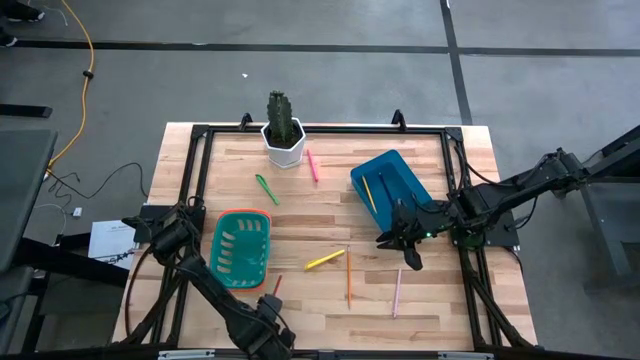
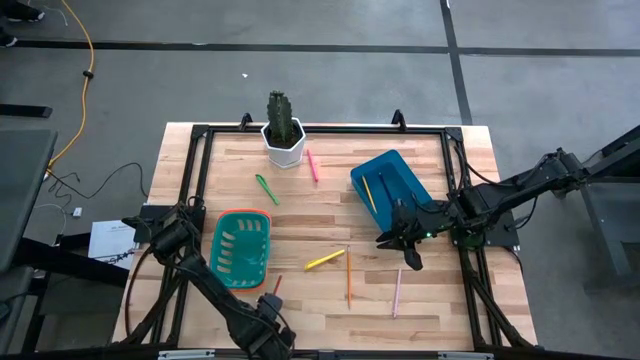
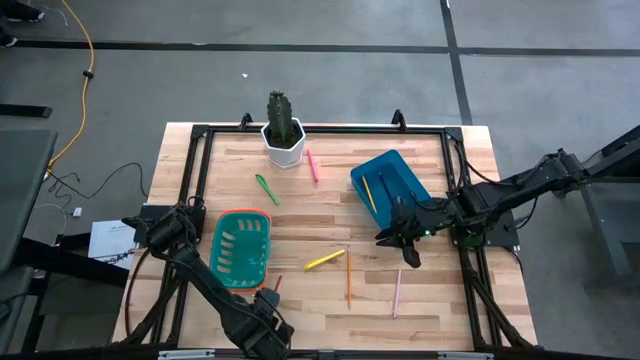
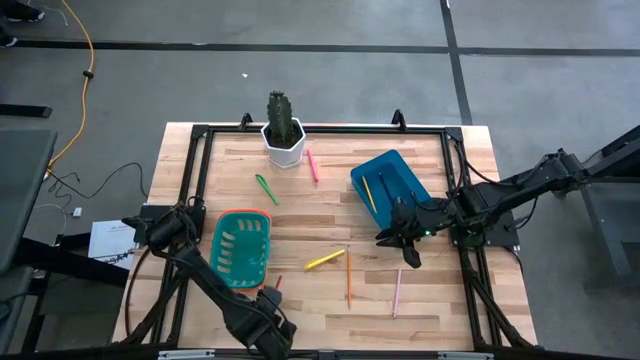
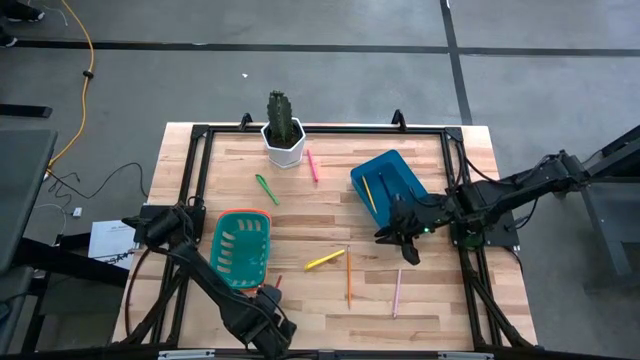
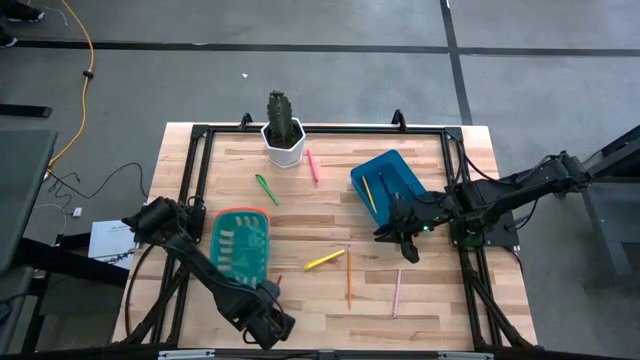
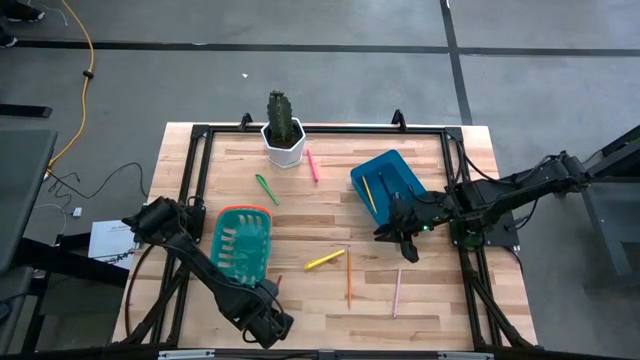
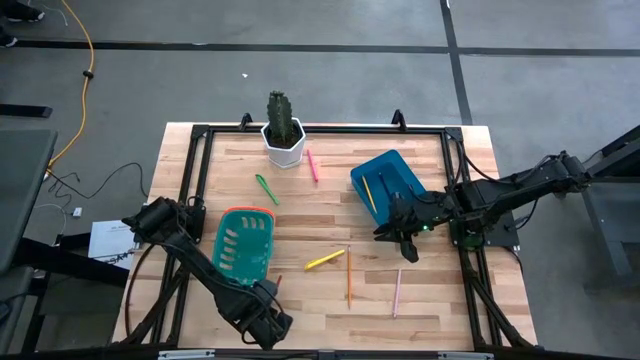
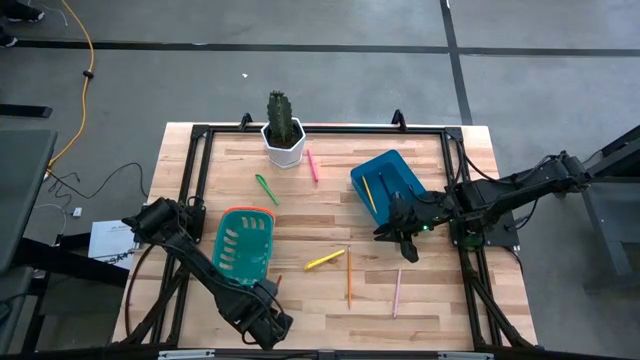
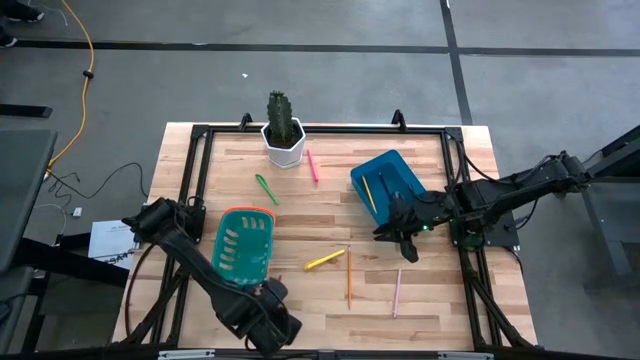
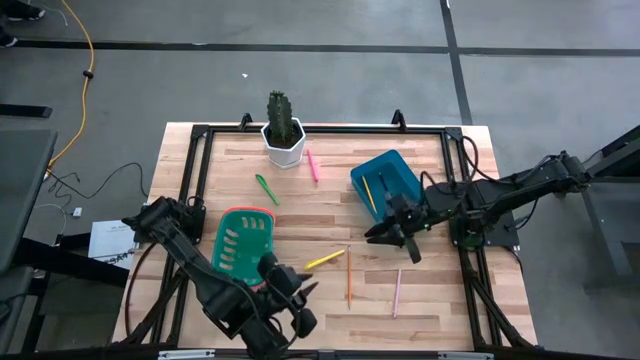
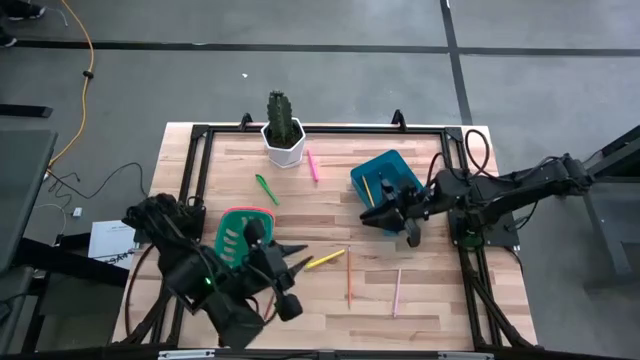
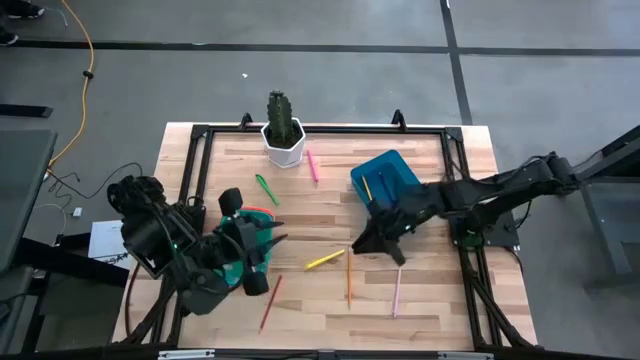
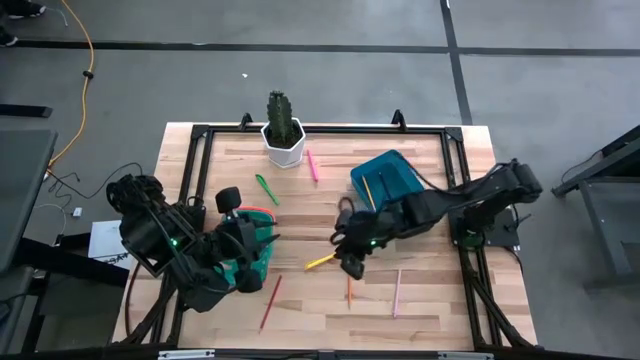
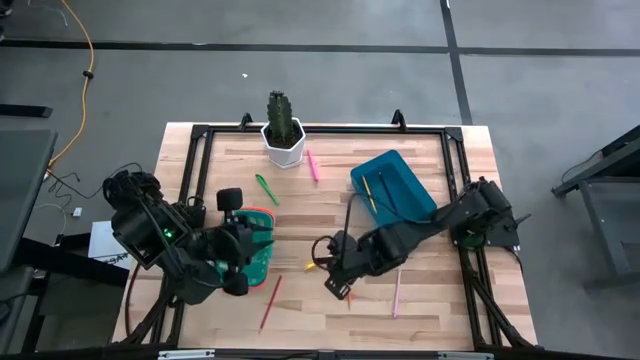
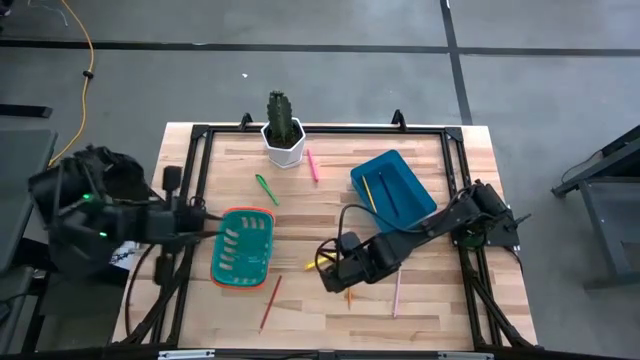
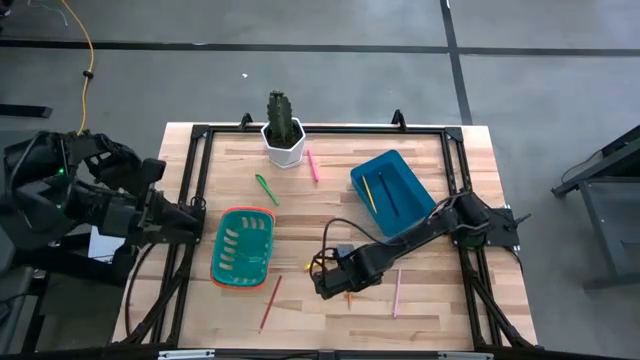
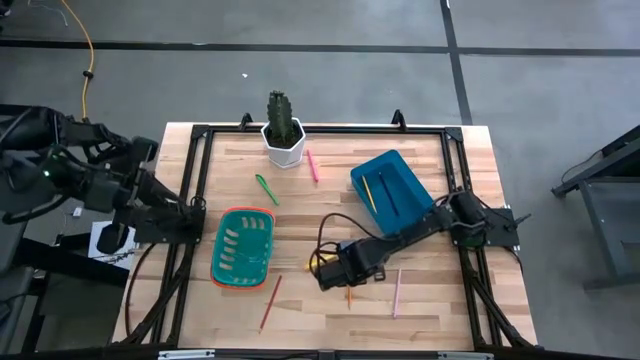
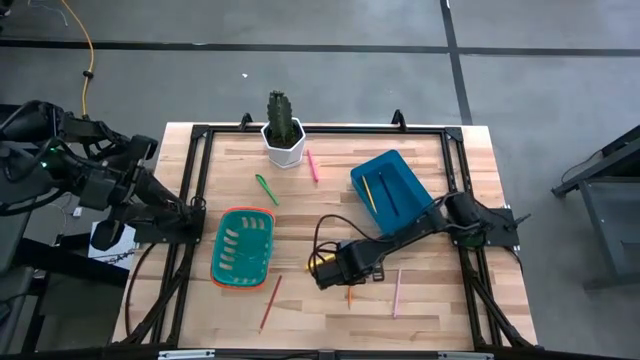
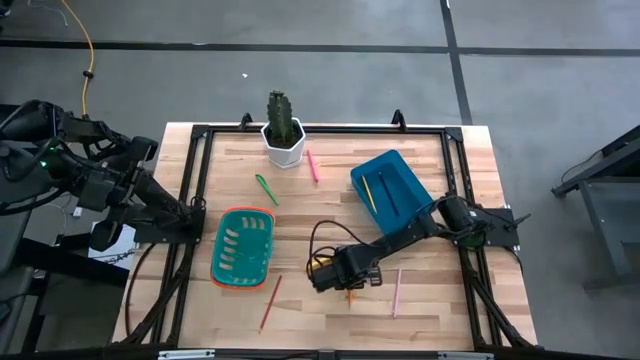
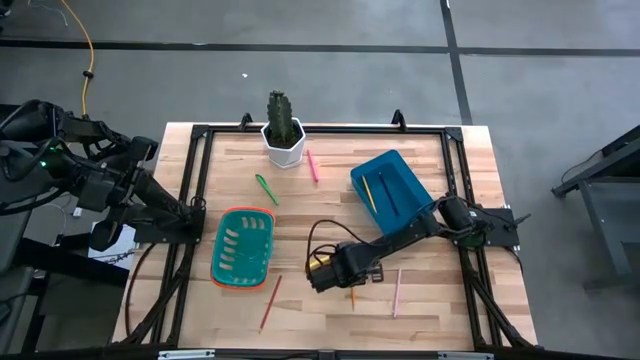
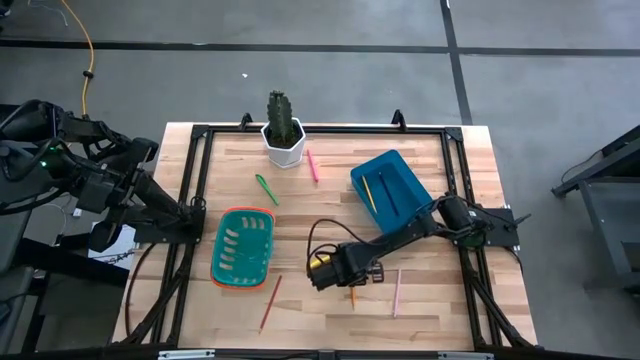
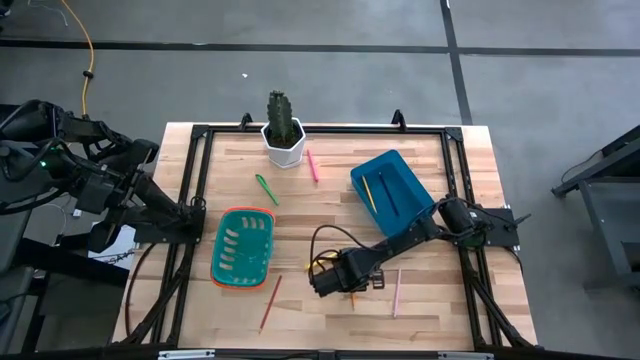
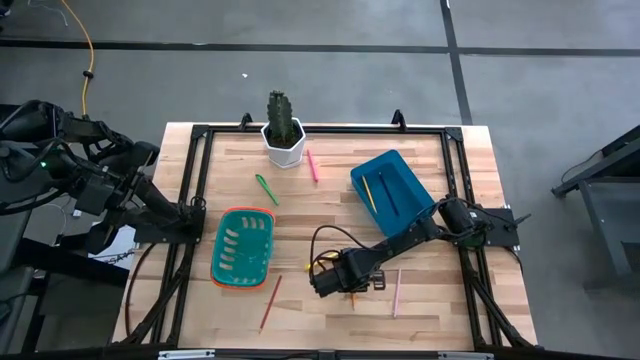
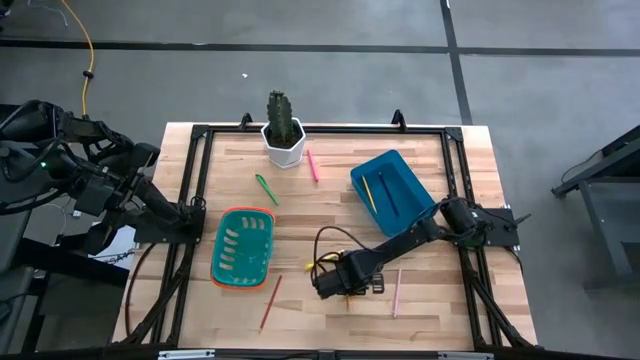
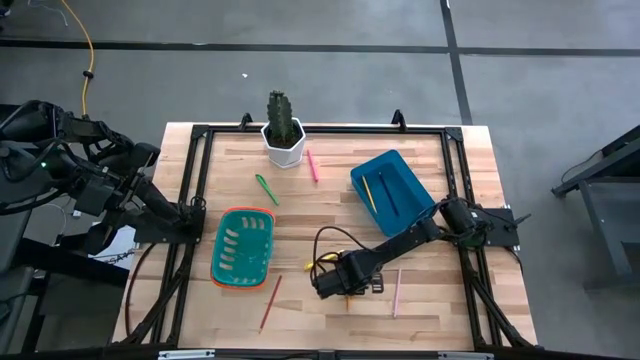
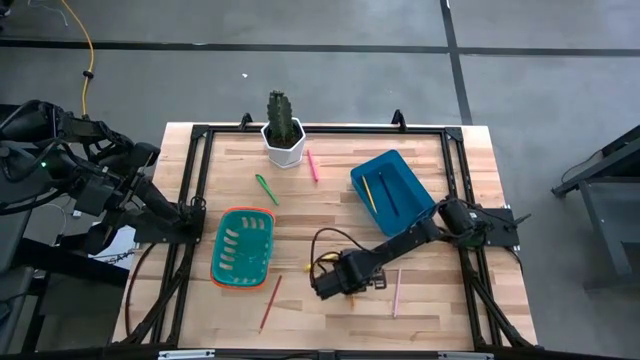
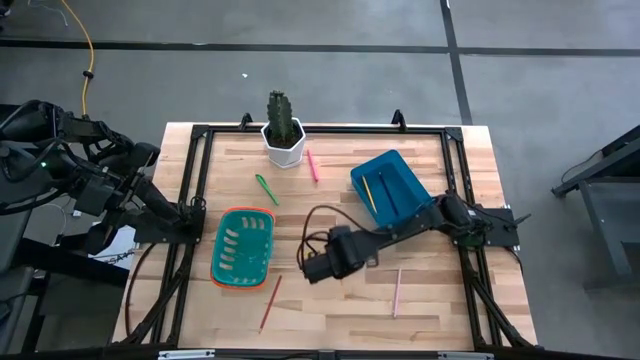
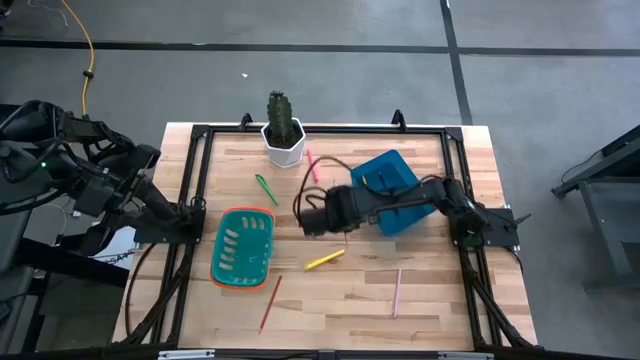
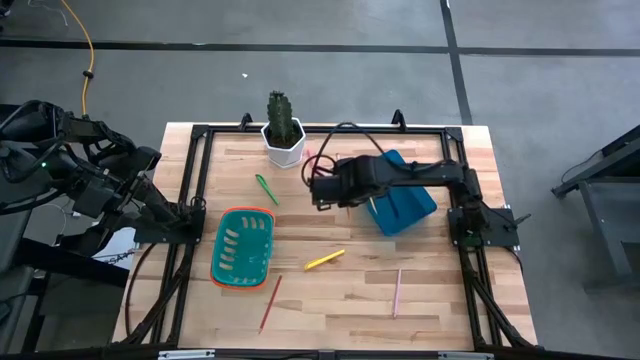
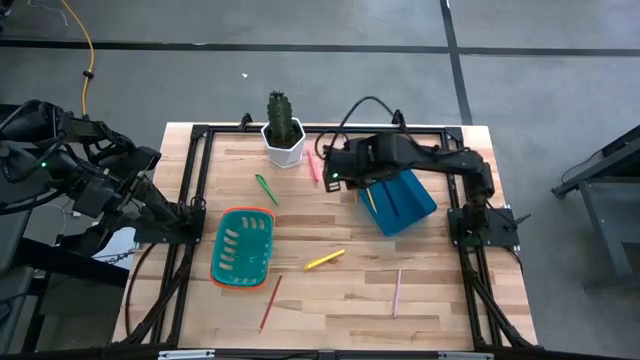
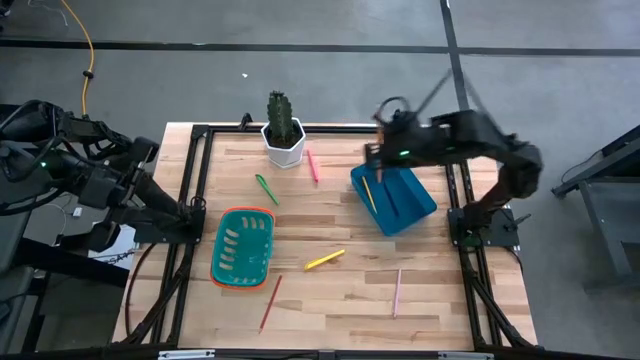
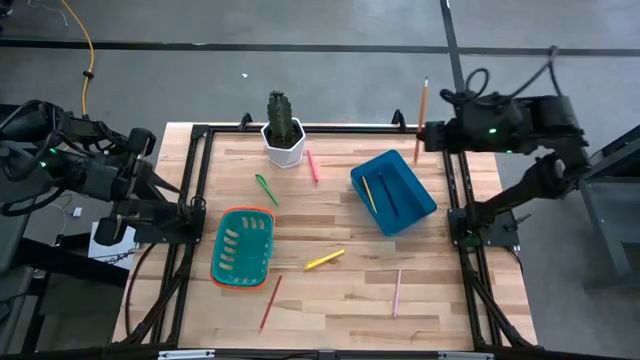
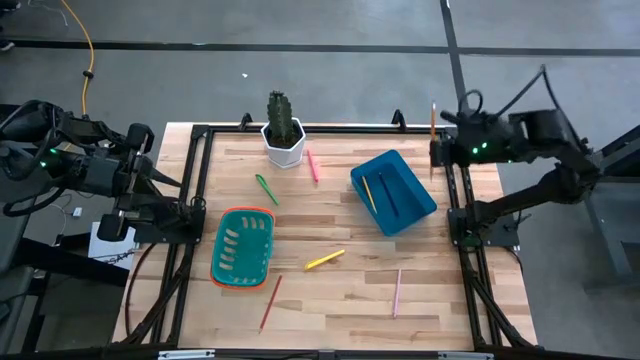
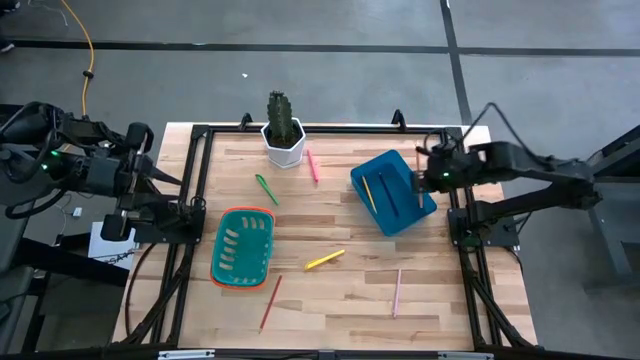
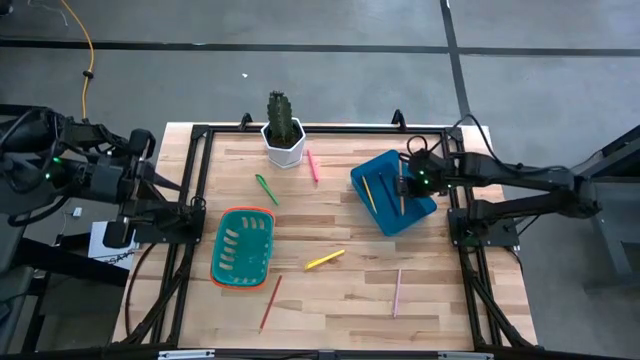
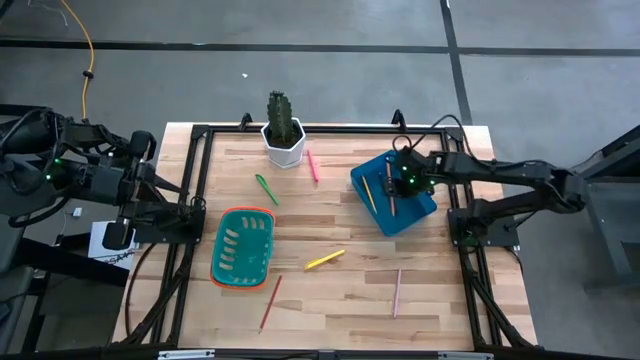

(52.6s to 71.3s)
Task: Sort pens & pencils
Put the orange pencil into the blue bin
